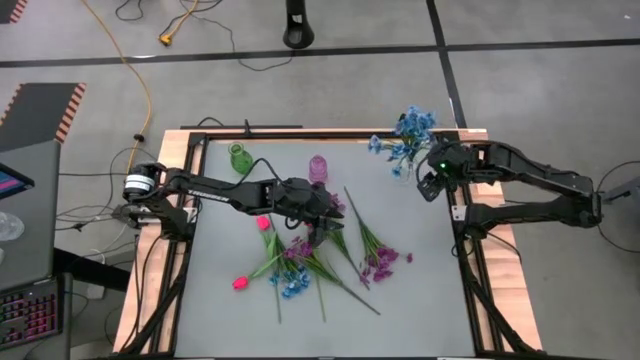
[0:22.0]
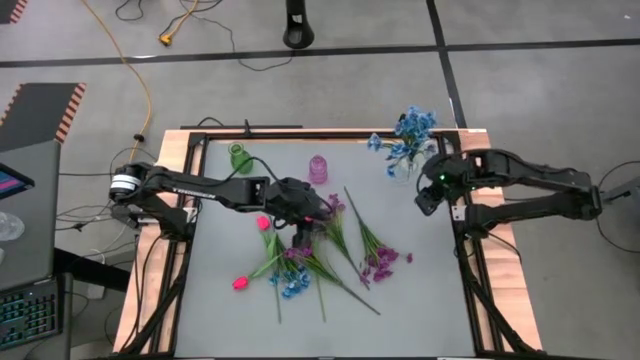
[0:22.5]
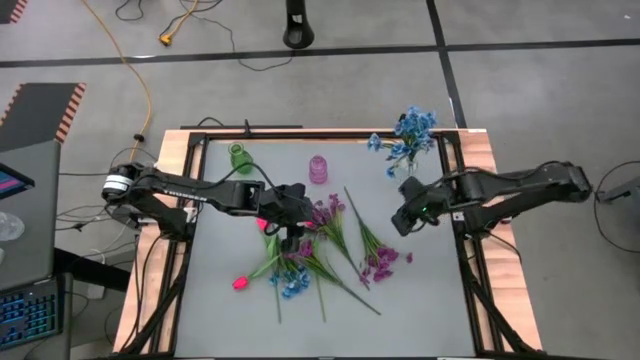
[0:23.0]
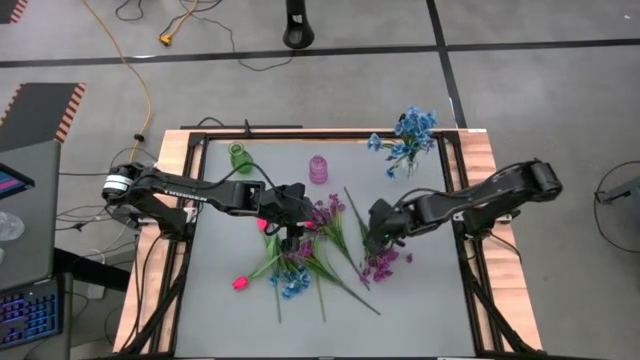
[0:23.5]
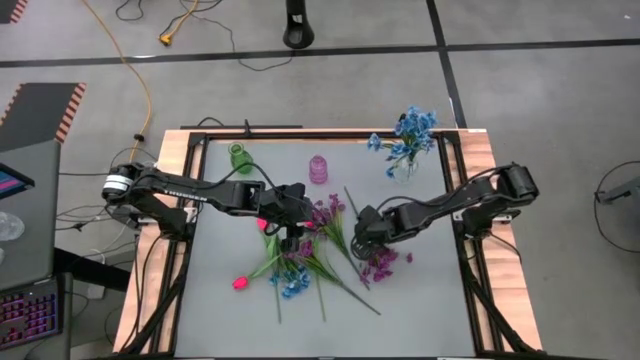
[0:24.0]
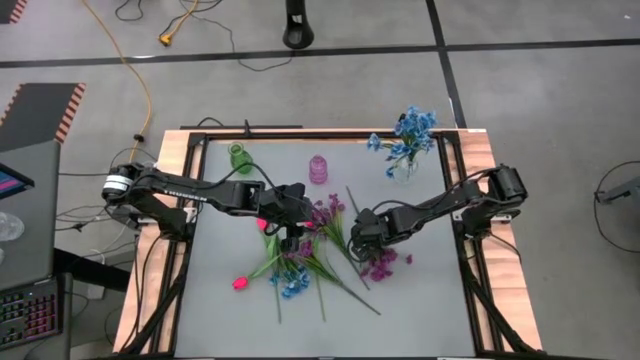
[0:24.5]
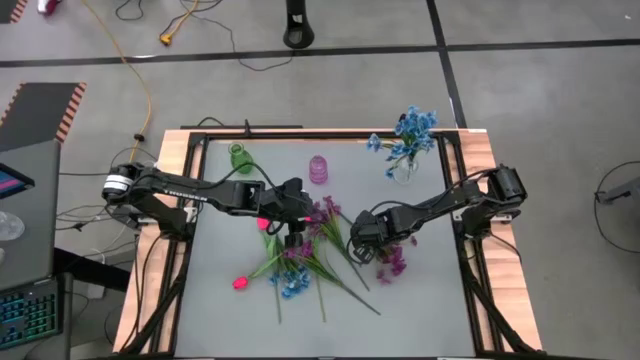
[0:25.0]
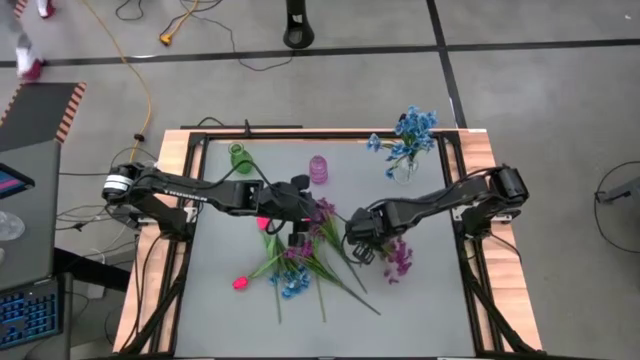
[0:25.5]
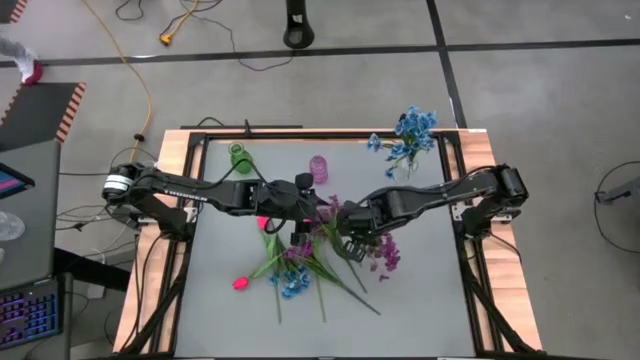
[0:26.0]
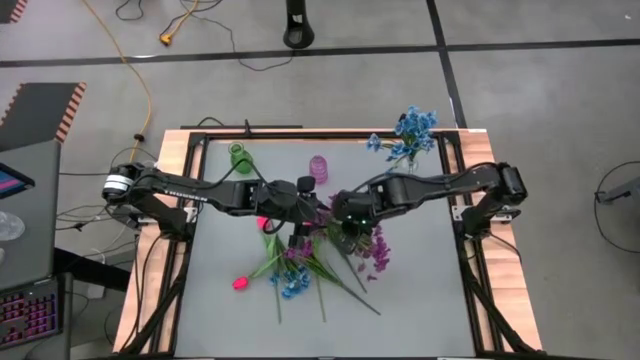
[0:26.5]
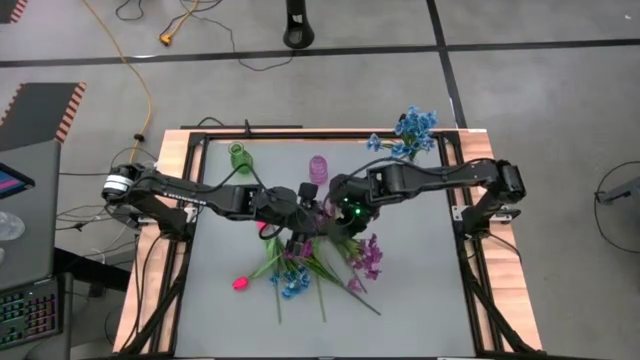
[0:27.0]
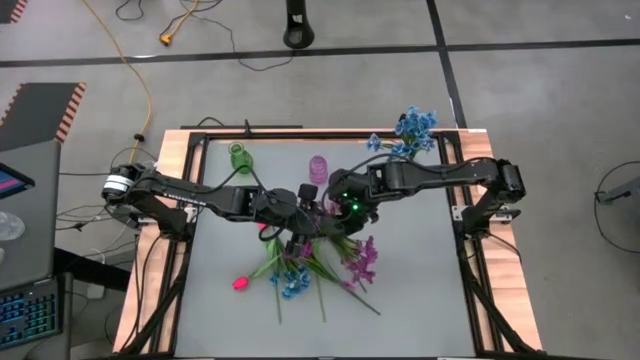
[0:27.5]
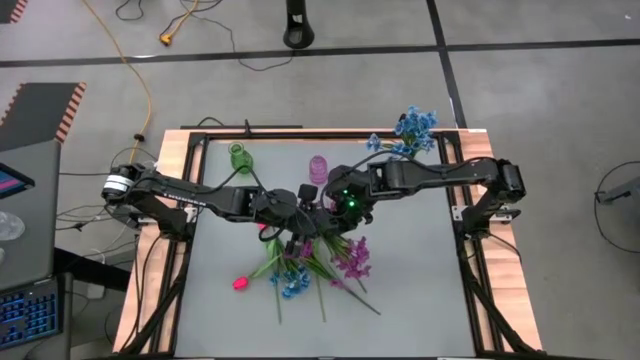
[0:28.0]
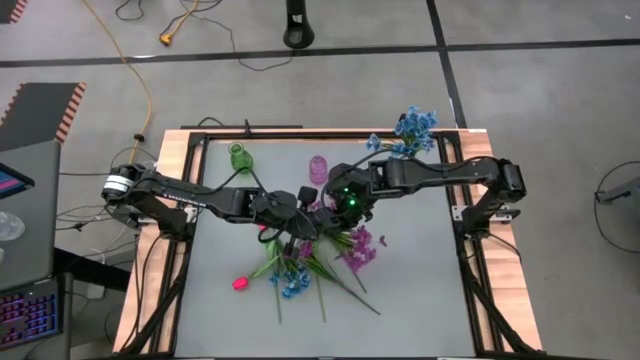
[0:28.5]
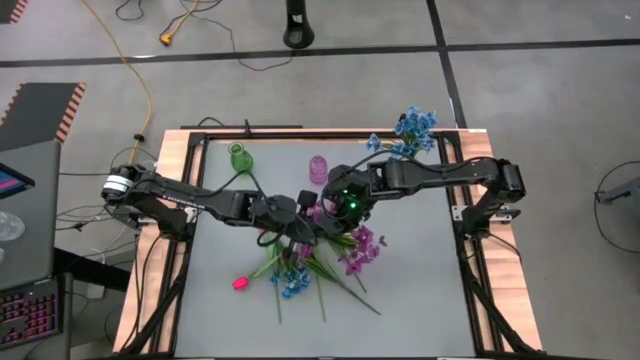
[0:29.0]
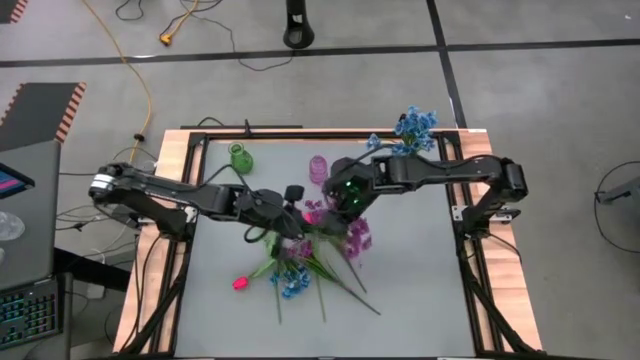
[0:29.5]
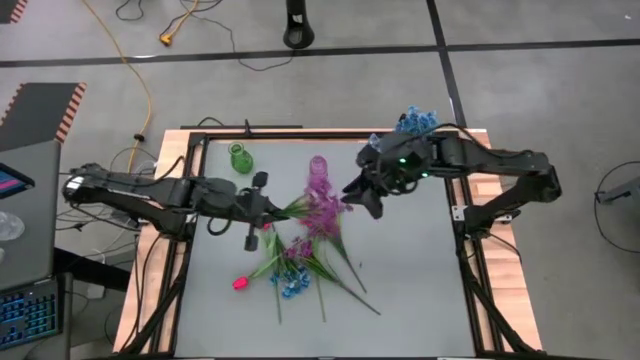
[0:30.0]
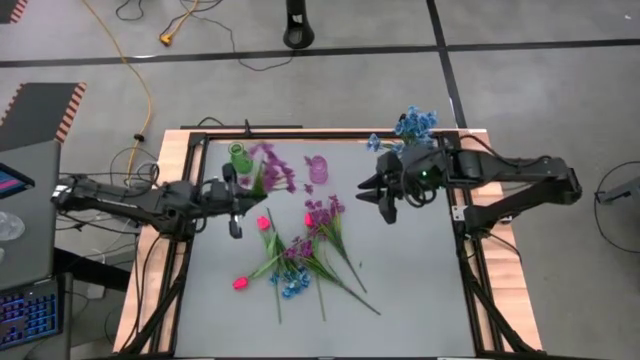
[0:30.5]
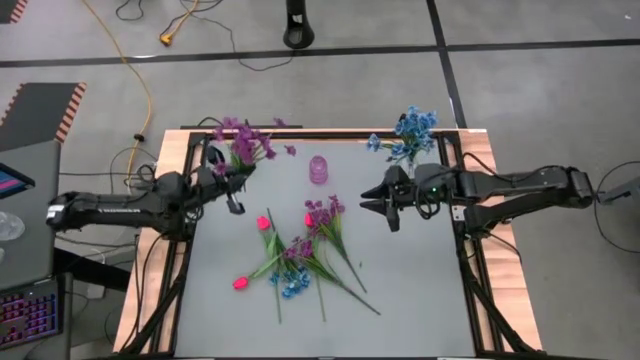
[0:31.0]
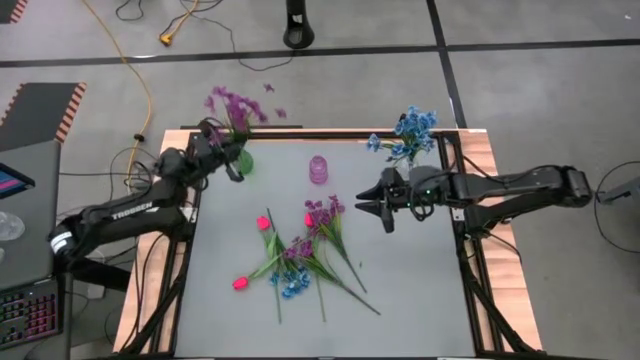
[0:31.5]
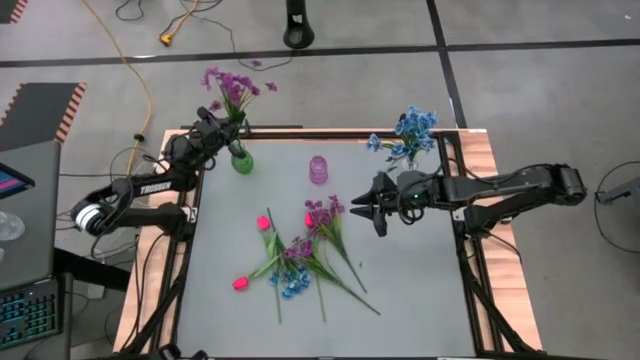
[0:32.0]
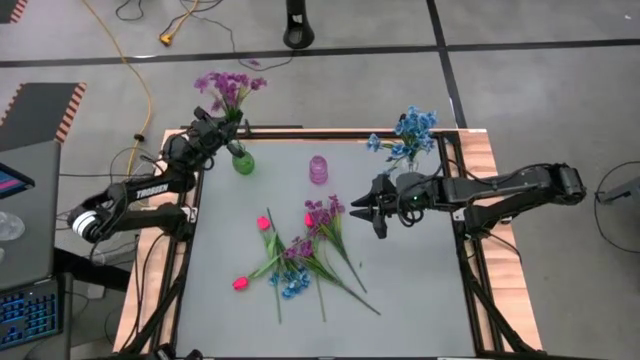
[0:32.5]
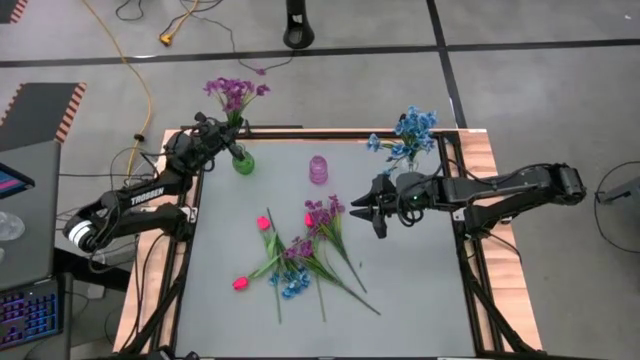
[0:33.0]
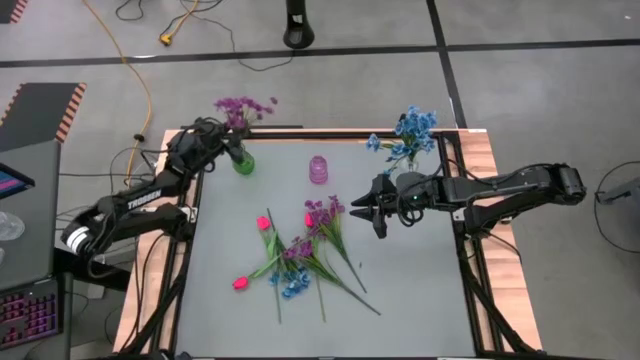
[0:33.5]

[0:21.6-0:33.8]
Task: Sort flowers into vase by color
Put the right purple flowers into the green vase

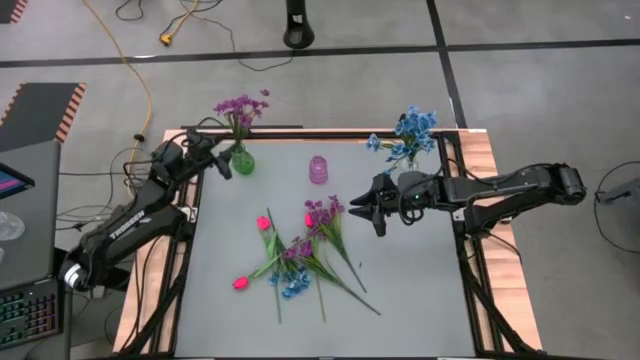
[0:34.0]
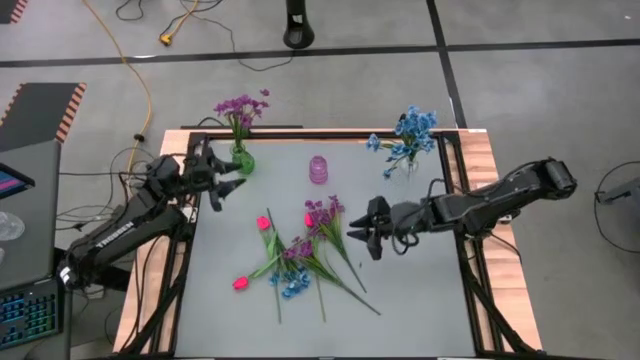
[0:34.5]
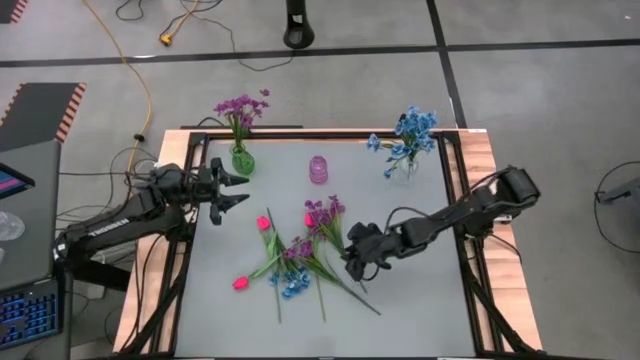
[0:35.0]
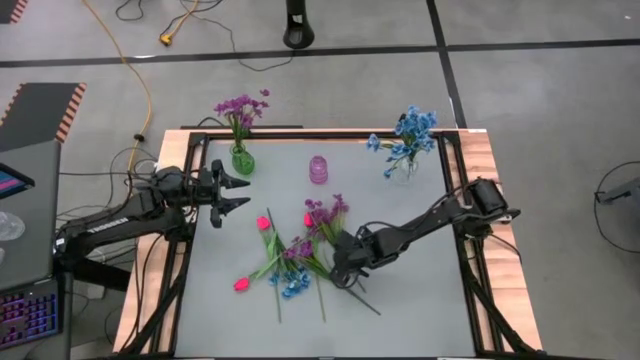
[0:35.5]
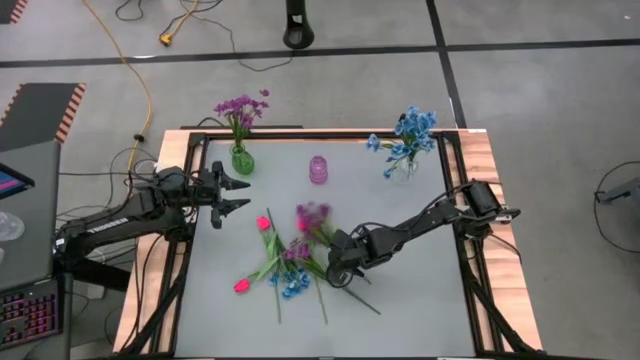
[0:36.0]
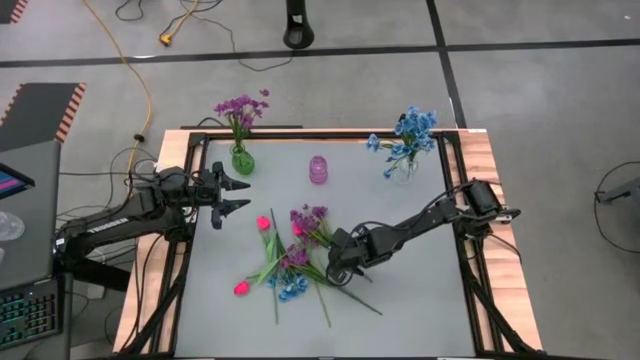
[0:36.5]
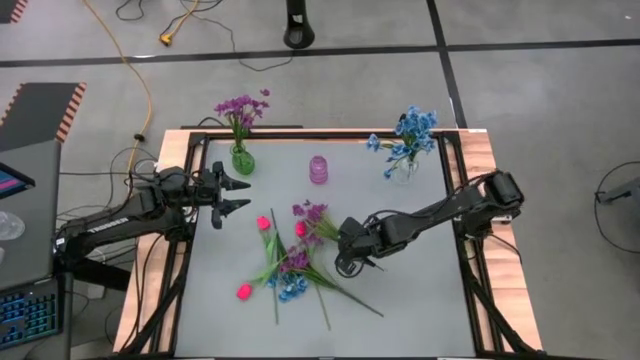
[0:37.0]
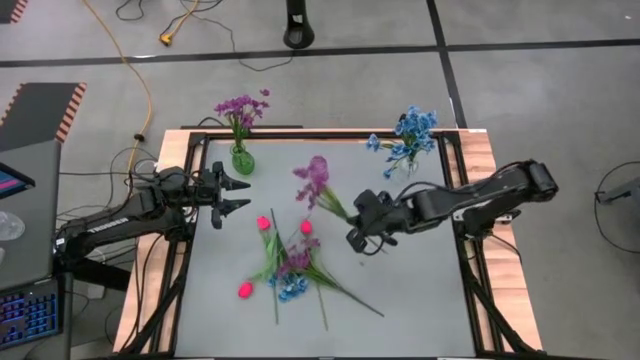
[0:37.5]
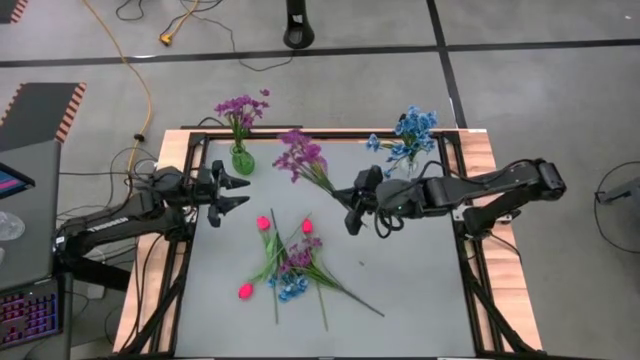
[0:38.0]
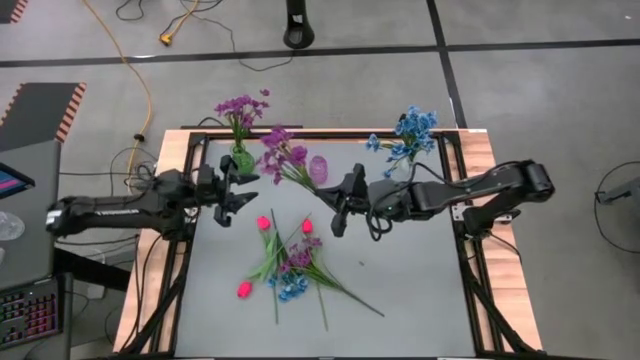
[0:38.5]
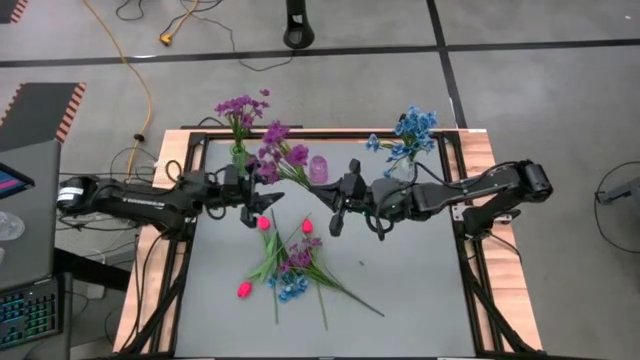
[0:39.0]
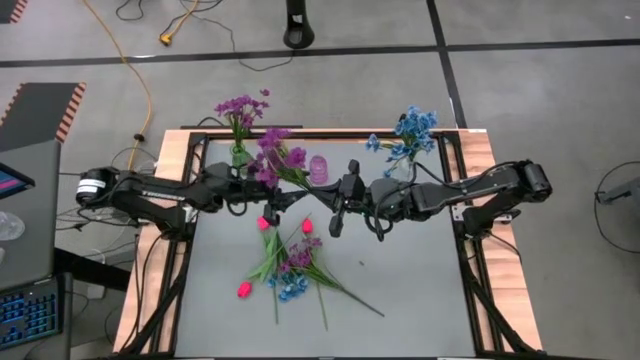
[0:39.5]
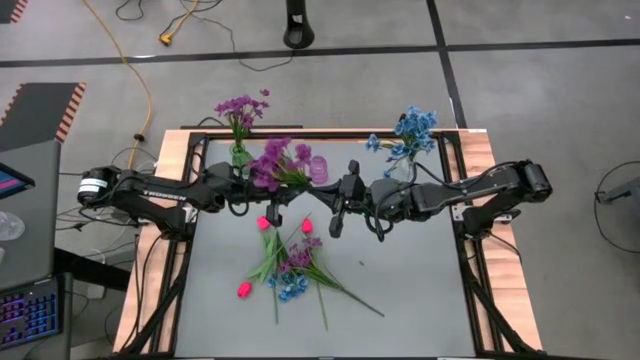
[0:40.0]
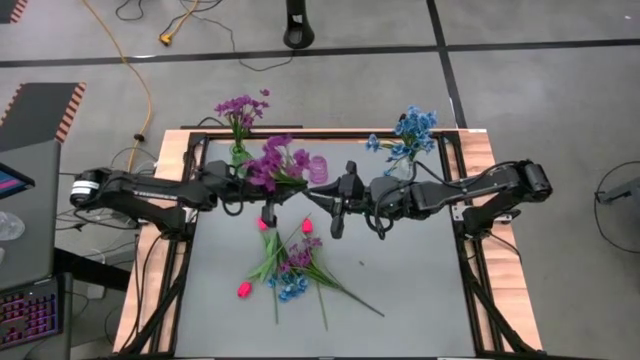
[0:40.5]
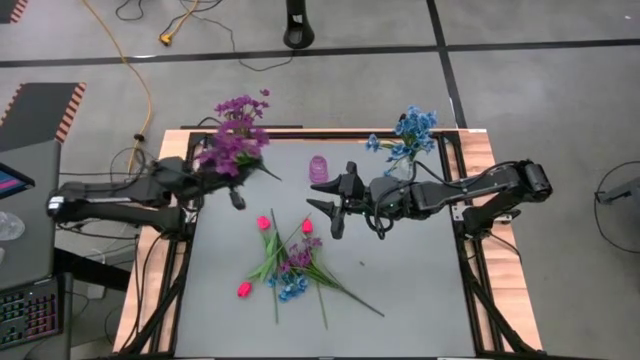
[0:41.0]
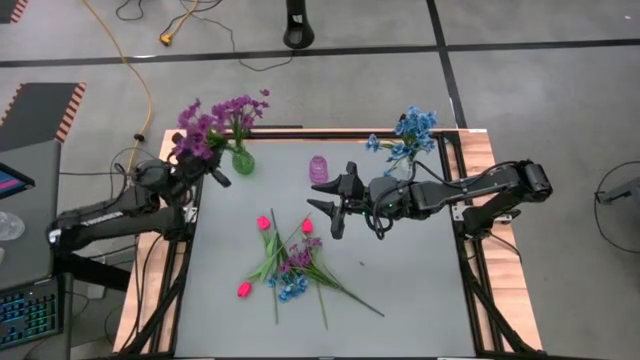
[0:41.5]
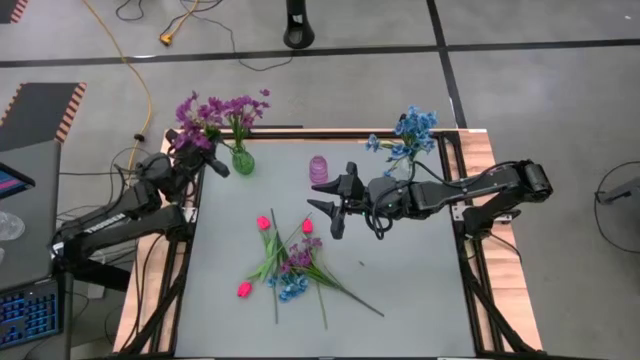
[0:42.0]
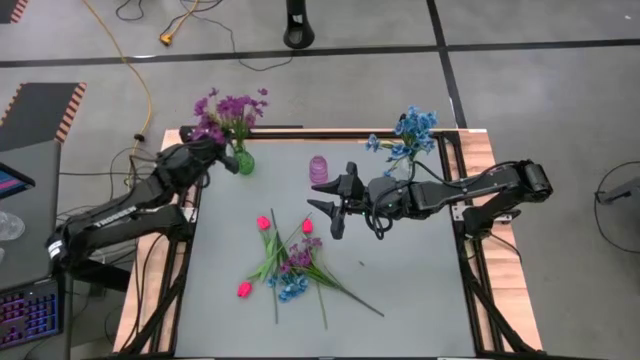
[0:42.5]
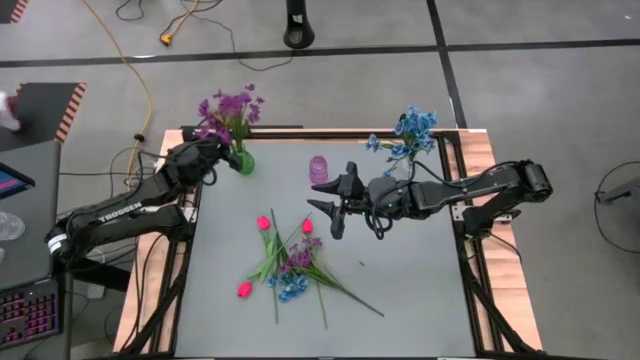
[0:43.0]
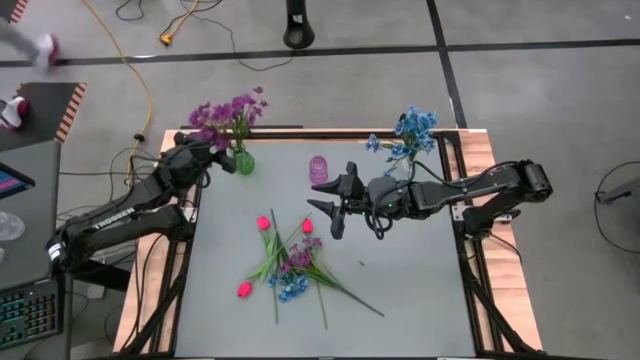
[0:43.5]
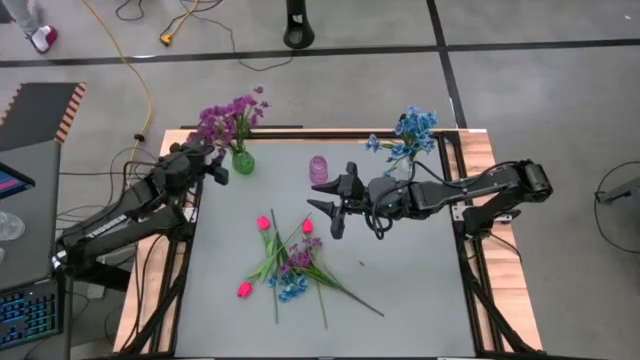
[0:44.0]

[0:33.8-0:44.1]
Put the top purple flowers into the green vase
